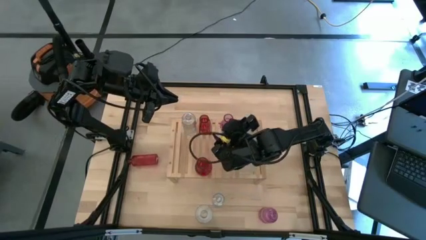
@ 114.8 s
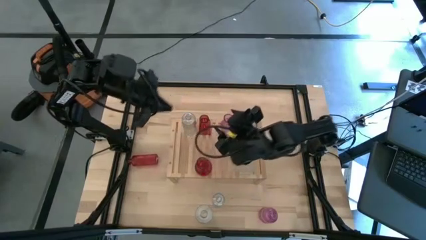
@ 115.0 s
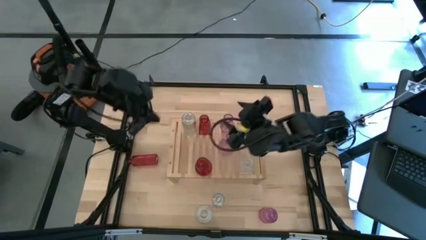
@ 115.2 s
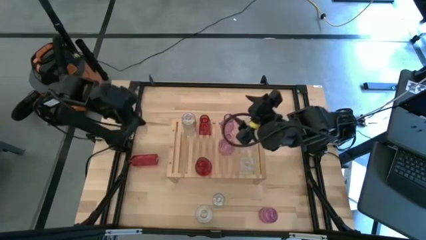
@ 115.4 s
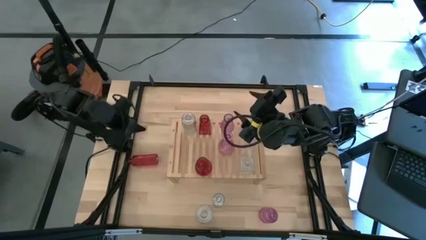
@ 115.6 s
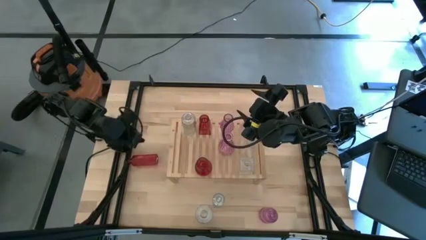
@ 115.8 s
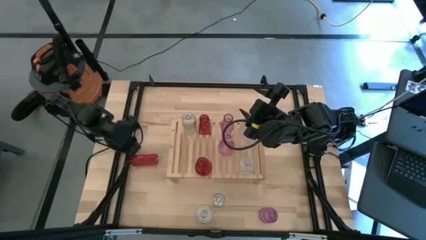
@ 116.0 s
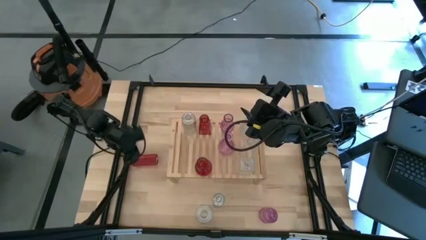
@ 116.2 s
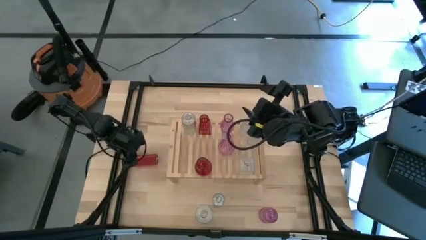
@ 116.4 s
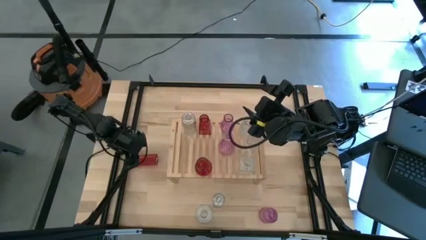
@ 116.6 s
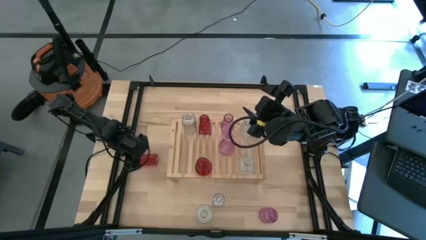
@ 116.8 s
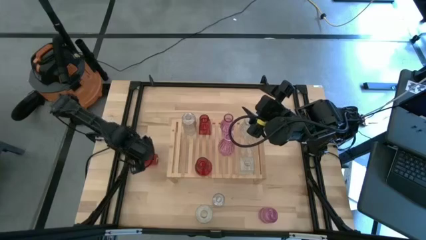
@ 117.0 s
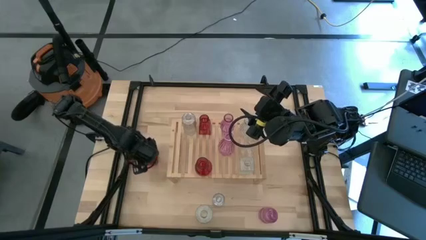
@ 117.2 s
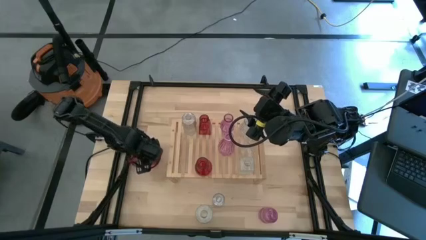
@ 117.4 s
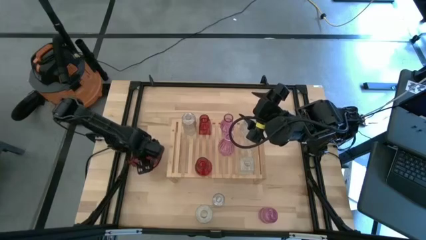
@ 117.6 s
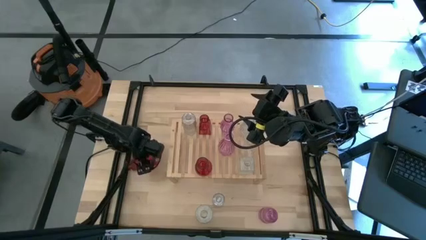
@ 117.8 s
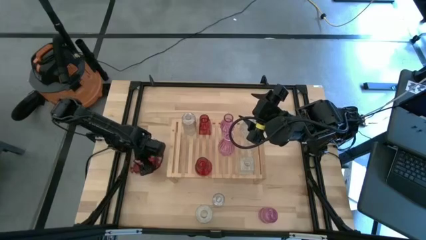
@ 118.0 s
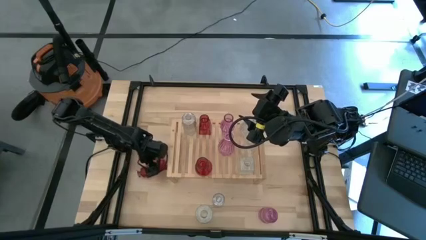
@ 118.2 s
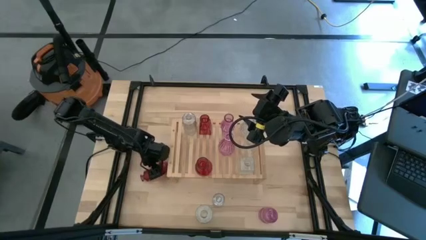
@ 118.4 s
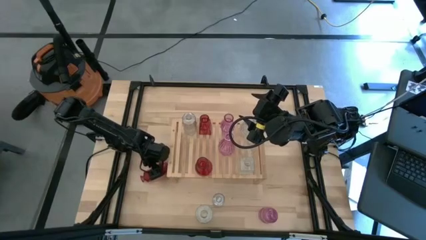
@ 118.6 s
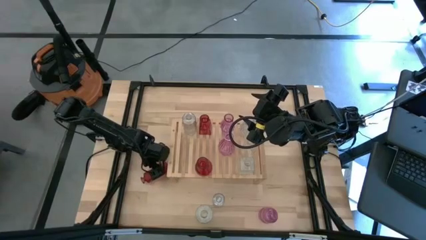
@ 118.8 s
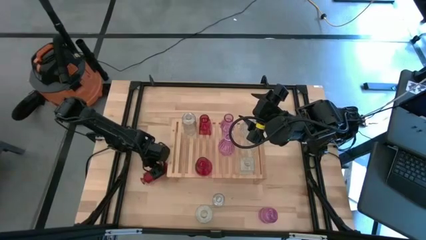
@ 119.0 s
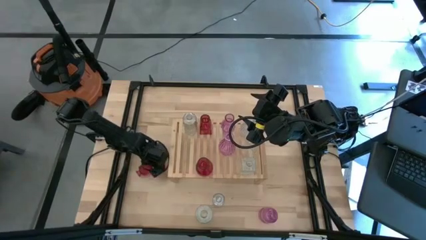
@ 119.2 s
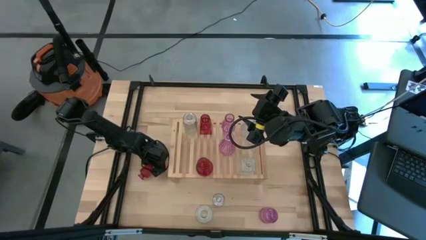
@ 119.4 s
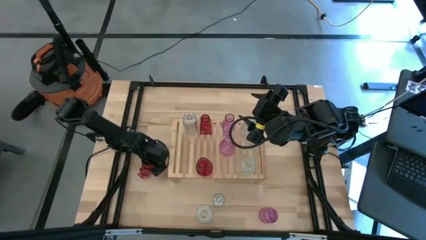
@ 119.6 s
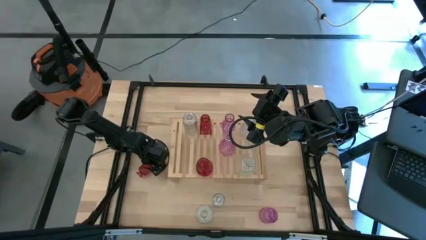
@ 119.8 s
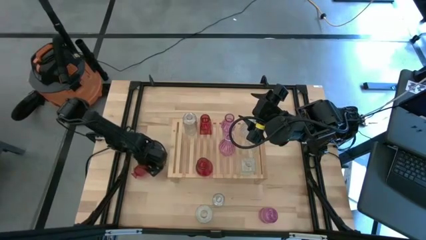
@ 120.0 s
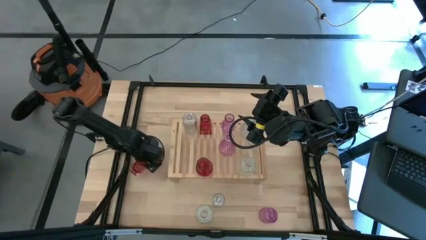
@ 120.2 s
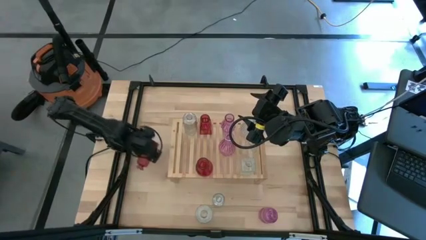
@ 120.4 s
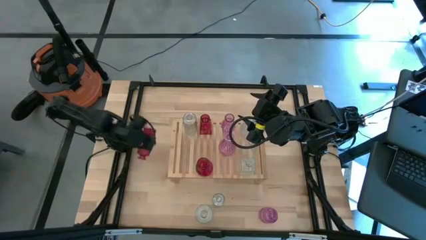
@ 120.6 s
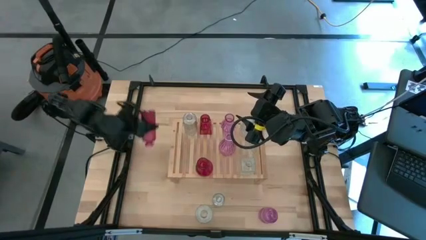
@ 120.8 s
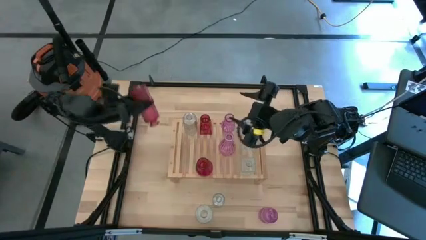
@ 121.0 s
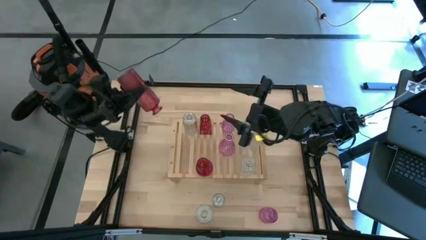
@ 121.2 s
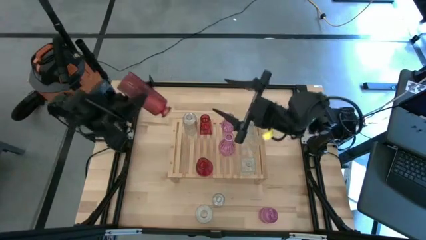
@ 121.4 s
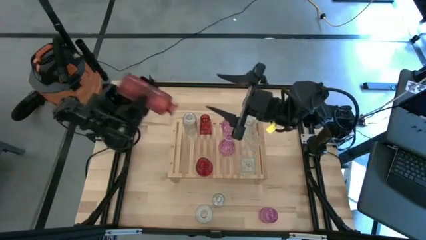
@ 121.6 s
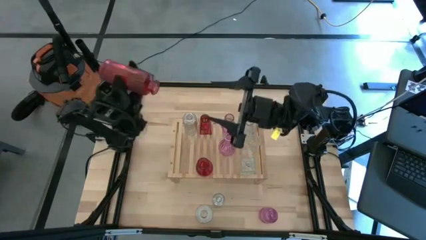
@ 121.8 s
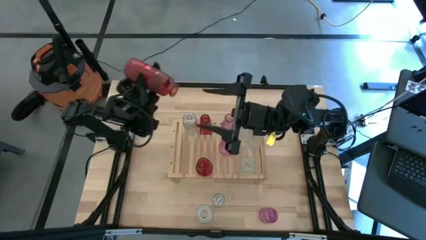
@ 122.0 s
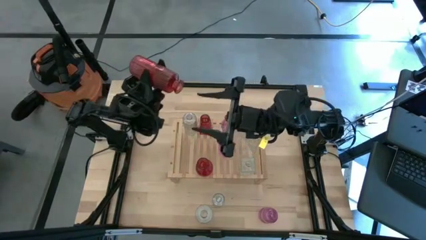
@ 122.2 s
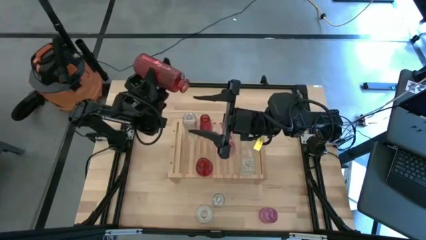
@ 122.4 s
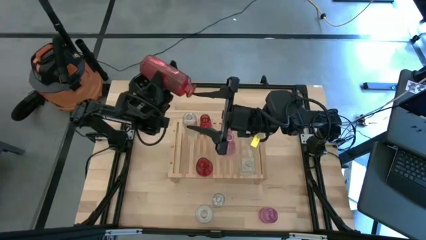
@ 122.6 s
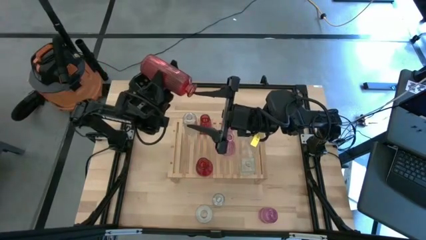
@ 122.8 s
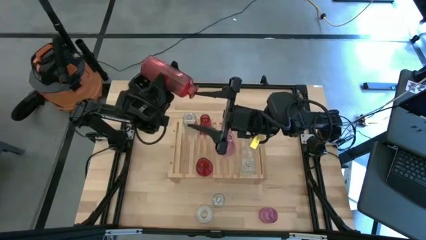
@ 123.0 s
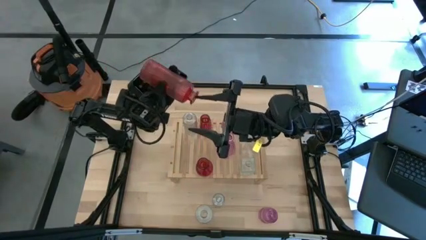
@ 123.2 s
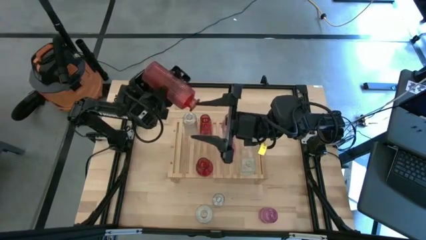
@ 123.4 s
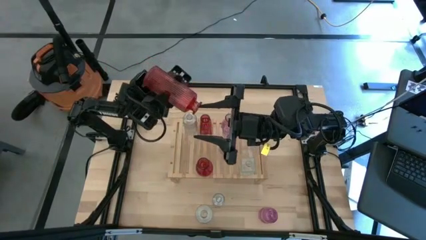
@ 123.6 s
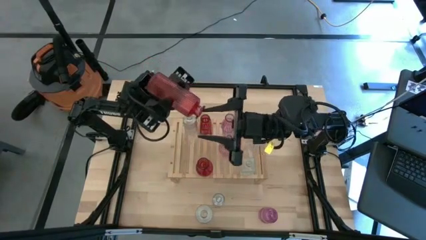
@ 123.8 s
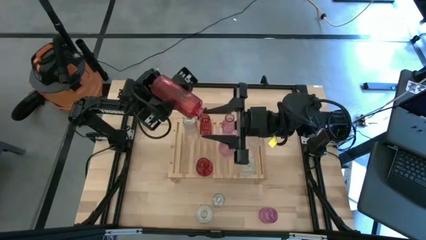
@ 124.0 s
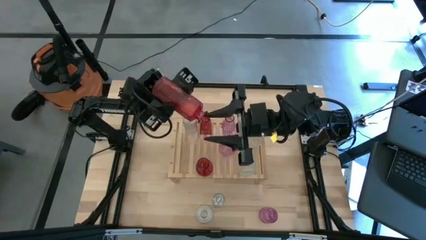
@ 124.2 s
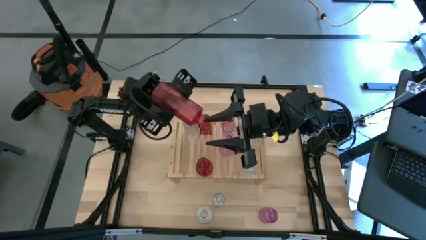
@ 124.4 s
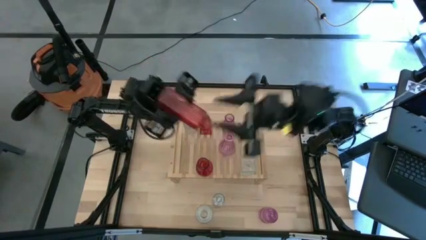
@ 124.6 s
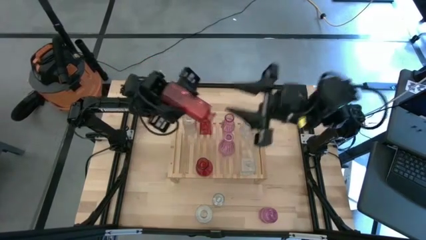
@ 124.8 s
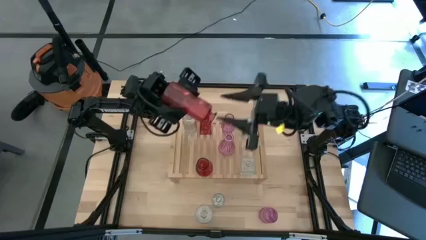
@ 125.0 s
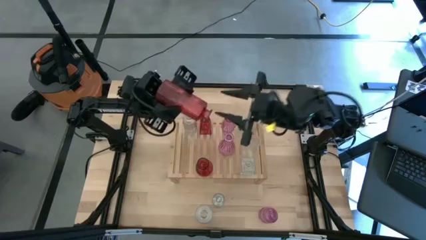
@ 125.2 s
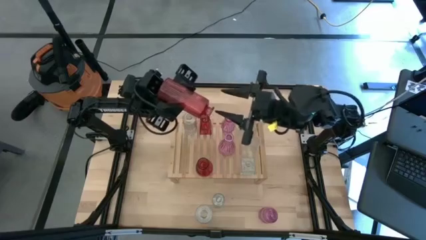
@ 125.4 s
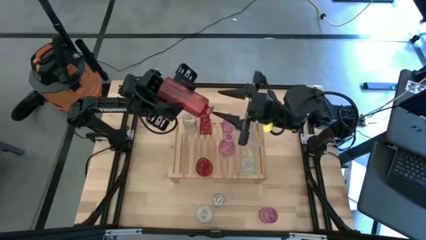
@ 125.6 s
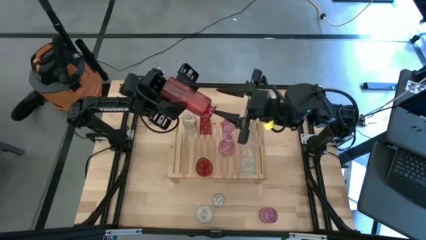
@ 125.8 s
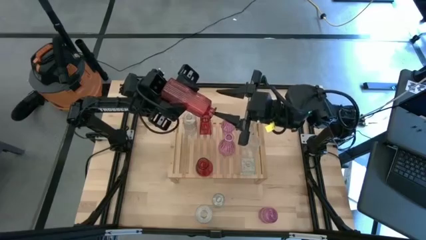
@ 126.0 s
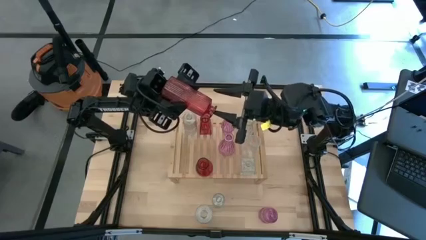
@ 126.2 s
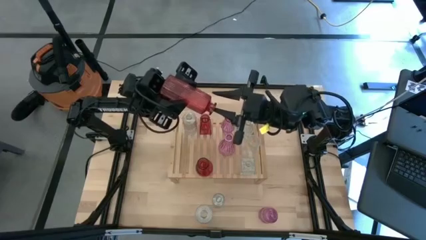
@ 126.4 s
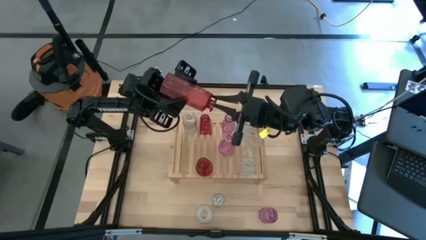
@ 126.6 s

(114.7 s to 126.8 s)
Task: sort vases onto shelf
Put the red vase on the shelf aligned with the other red vase

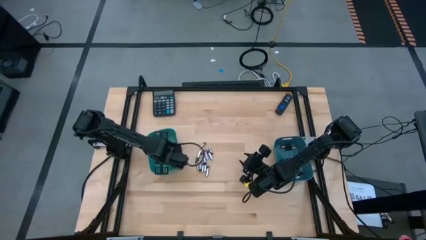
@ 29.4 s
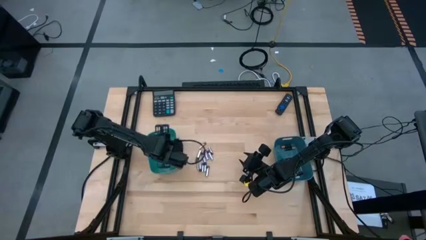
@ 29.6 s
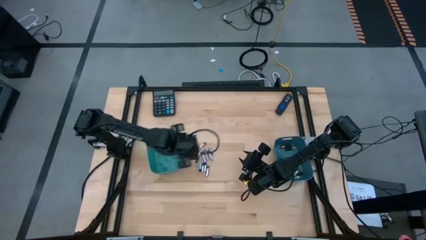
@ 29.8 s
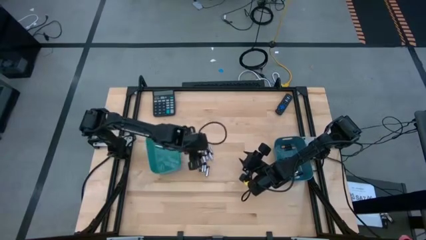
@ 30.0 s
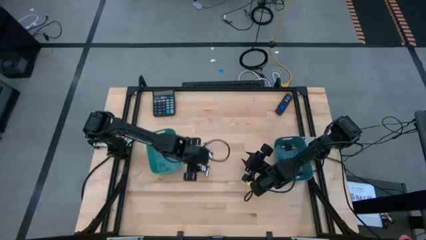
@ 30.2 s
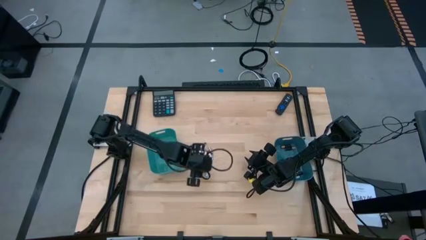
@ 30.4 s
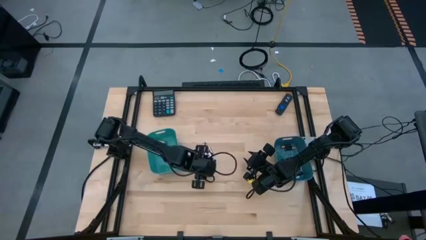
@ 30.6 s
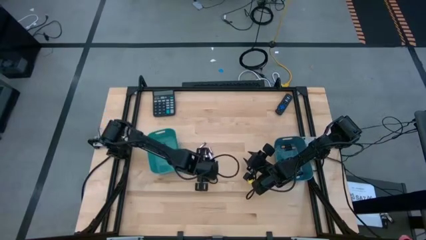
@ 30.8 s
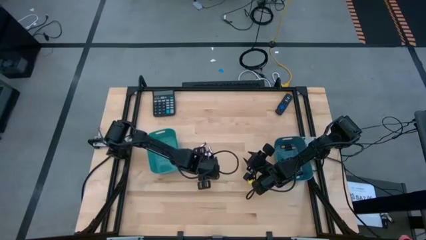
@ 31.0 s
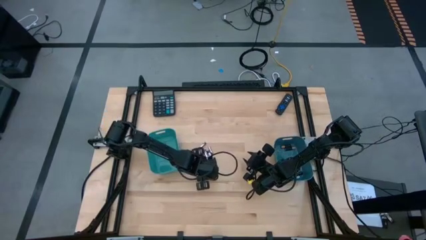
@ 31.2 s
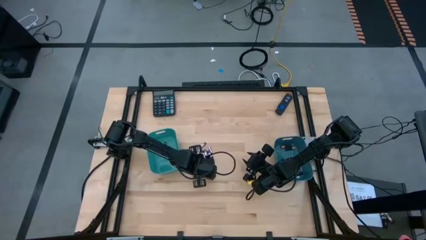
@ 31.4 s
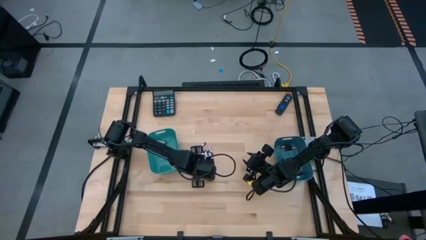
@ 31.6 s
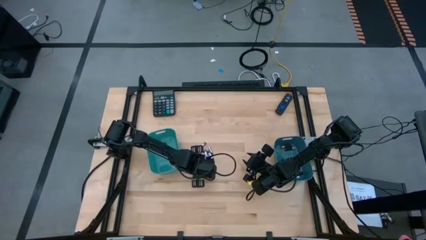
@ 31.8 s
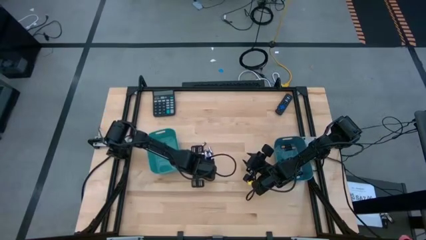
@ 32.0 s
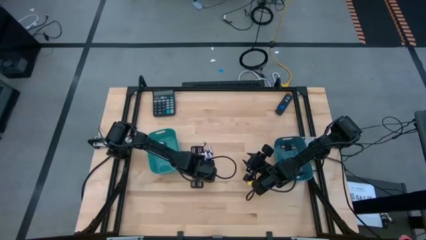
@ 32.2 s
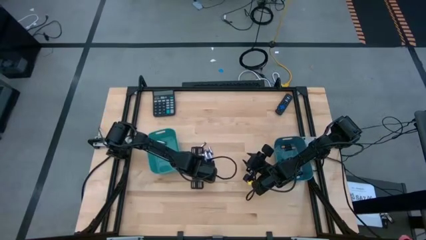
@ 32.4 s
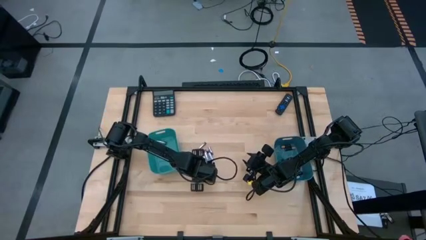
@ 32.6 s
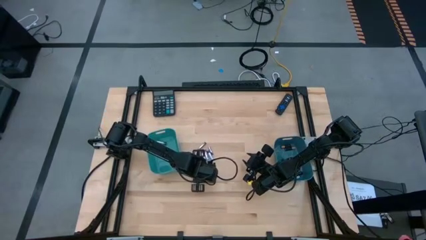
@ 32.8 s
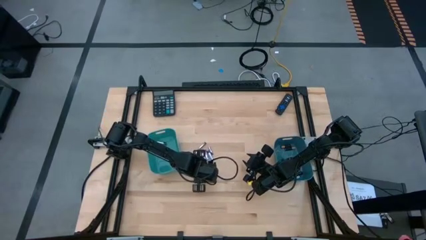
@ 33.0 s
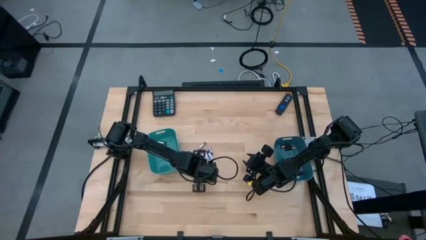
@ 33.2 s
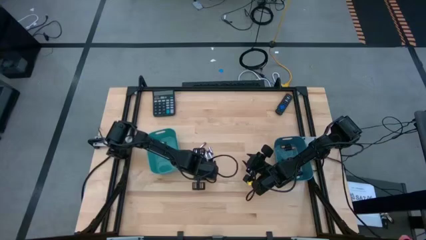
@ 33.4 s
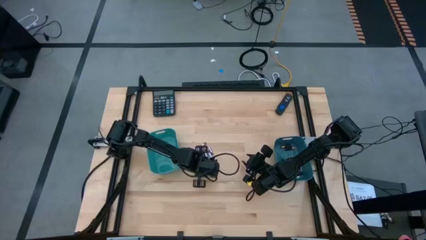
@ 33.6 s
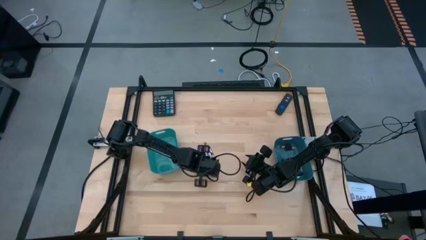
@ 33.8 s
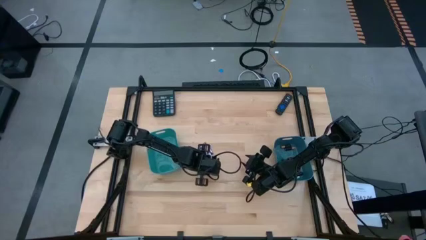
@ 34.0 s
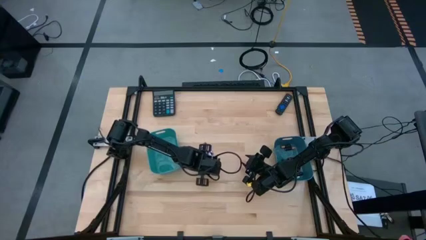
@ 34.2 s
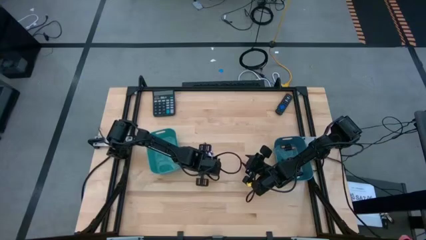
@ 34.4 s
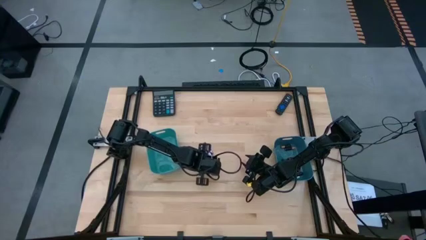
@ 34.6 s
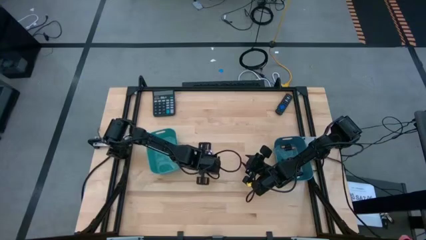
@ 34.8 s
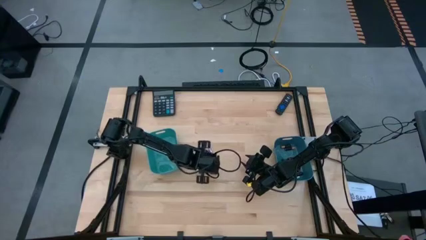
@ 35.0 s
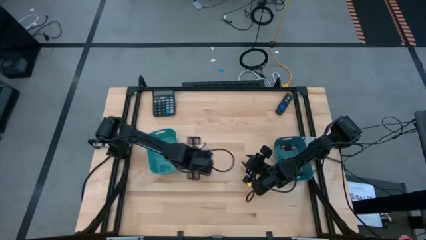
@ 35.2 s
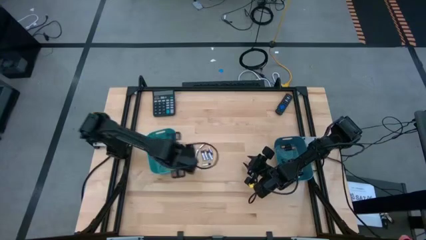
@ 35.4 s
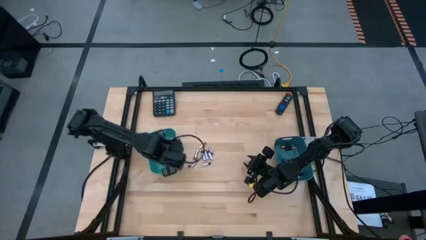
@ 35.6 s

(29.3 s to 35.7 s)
Task: Sort batteries
Put the white battery into the left blue bin
